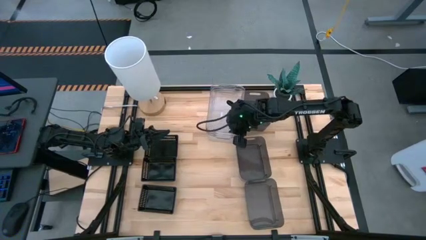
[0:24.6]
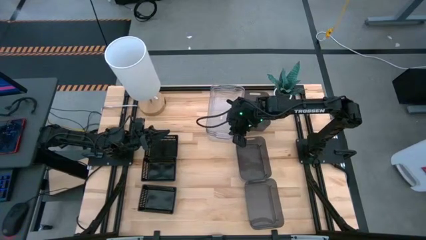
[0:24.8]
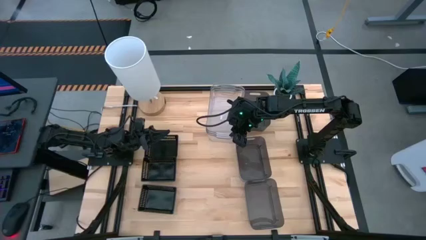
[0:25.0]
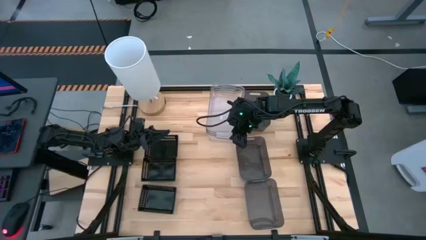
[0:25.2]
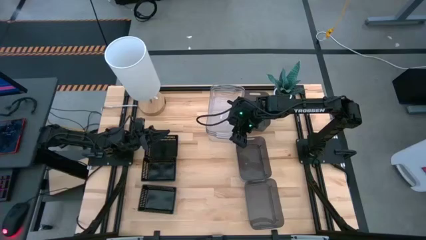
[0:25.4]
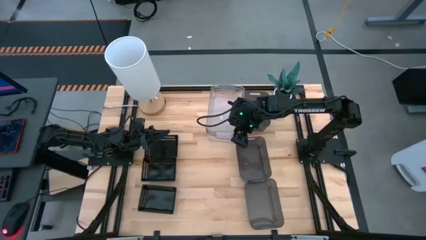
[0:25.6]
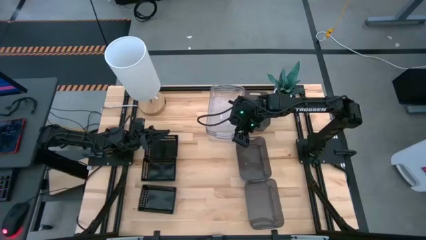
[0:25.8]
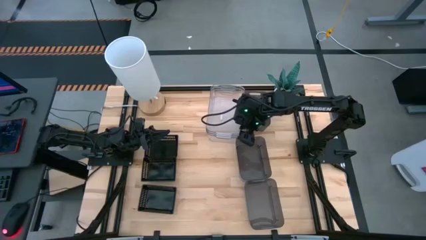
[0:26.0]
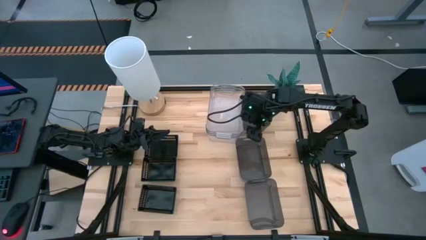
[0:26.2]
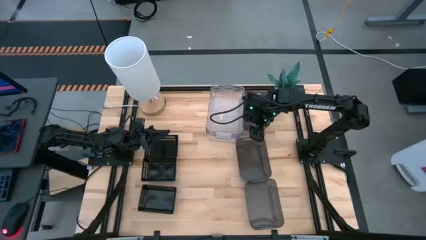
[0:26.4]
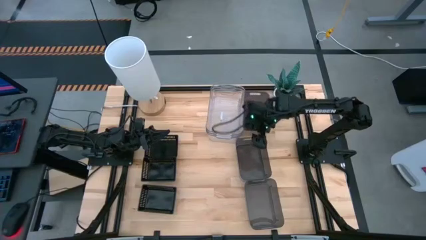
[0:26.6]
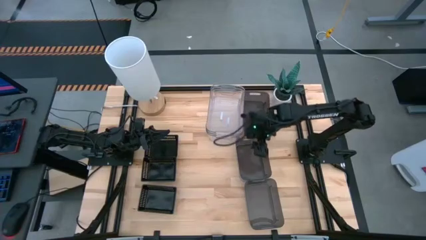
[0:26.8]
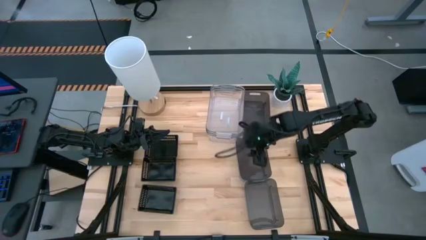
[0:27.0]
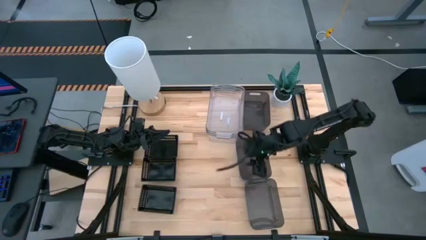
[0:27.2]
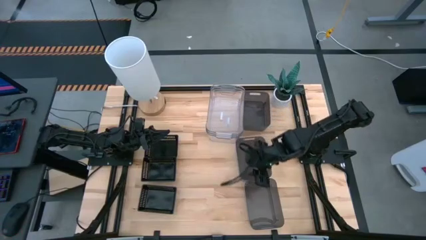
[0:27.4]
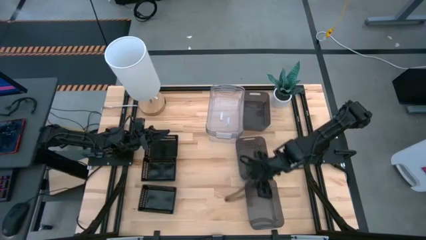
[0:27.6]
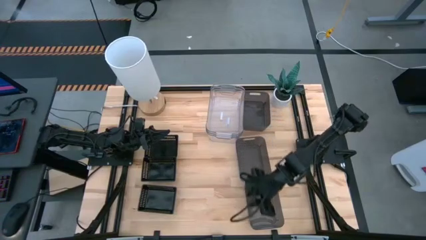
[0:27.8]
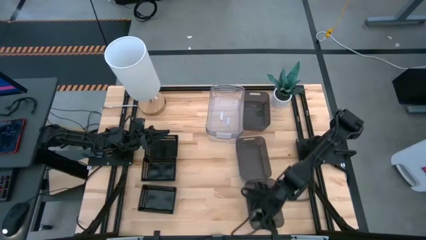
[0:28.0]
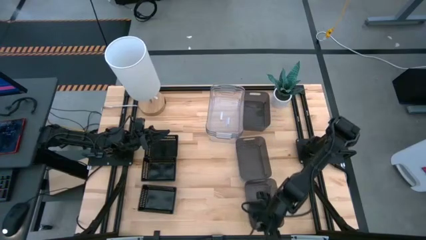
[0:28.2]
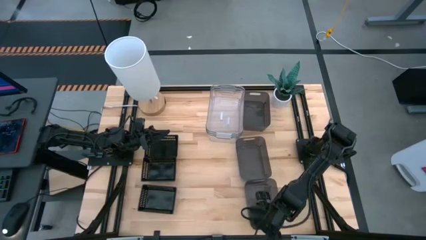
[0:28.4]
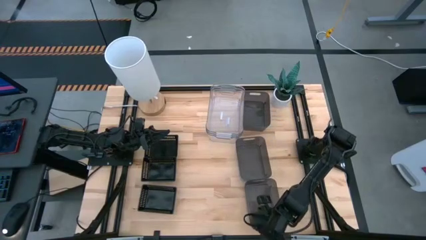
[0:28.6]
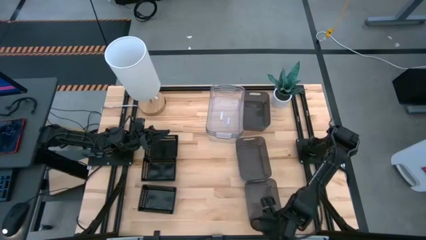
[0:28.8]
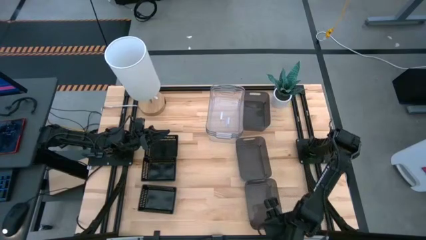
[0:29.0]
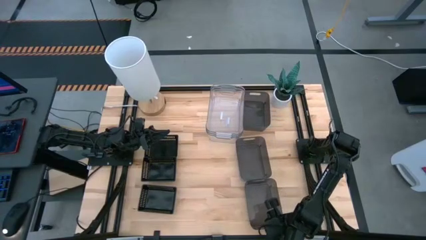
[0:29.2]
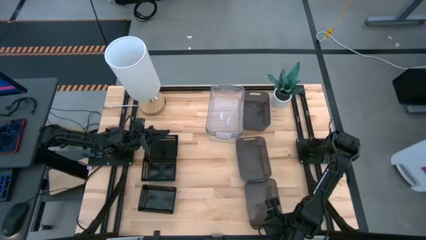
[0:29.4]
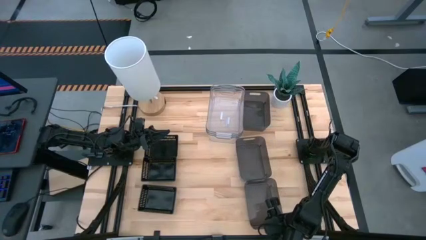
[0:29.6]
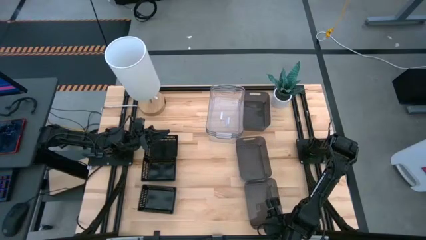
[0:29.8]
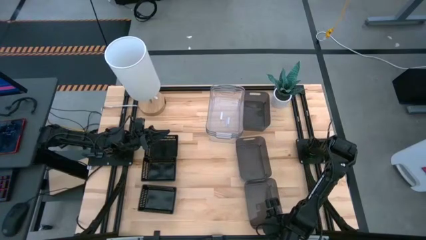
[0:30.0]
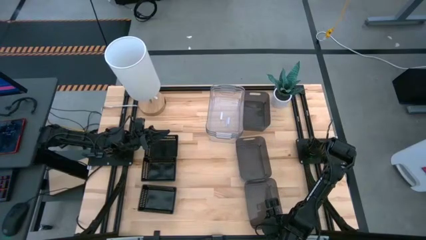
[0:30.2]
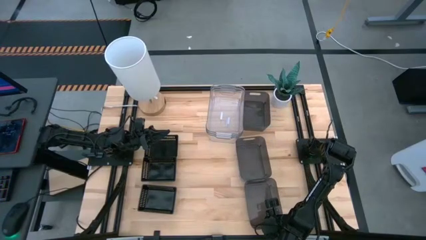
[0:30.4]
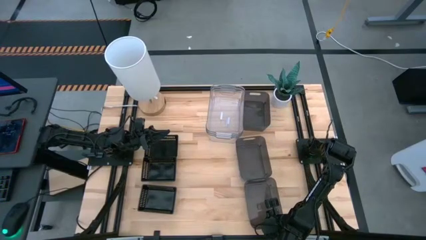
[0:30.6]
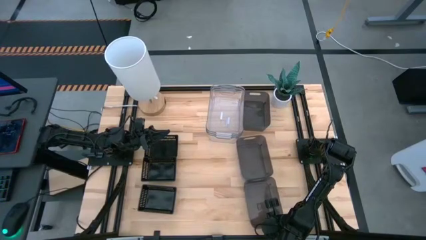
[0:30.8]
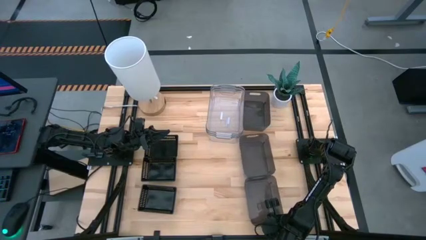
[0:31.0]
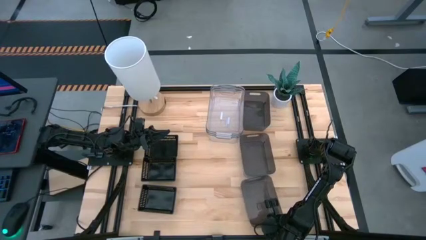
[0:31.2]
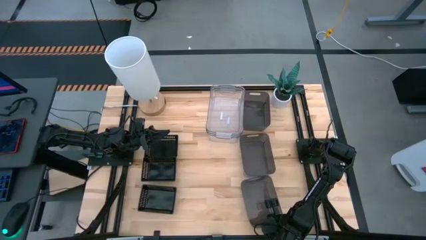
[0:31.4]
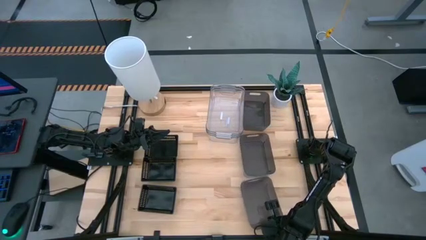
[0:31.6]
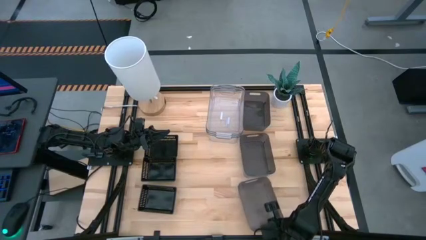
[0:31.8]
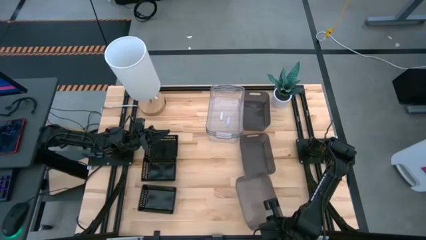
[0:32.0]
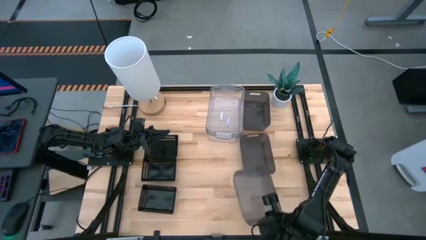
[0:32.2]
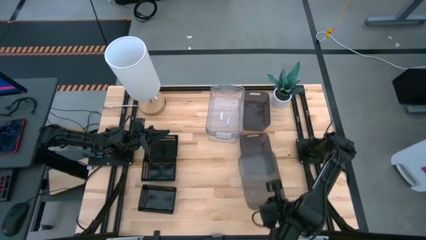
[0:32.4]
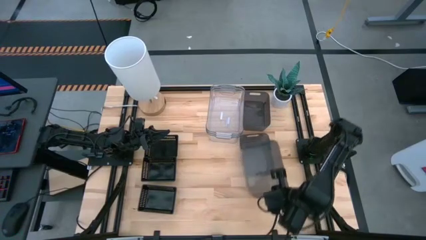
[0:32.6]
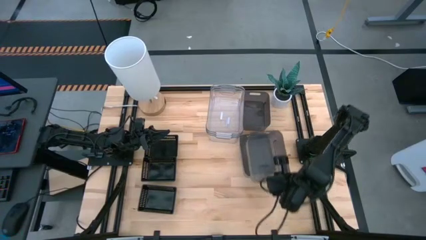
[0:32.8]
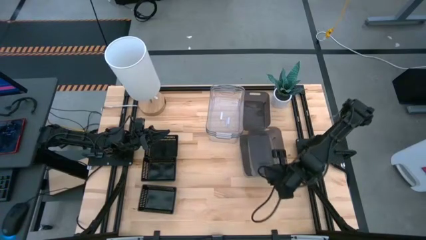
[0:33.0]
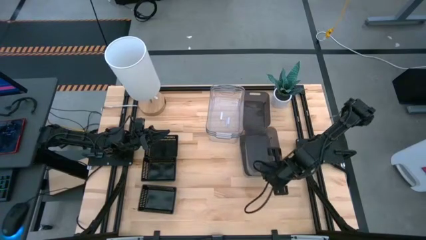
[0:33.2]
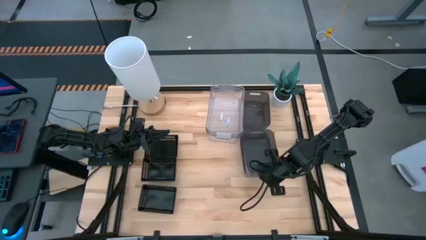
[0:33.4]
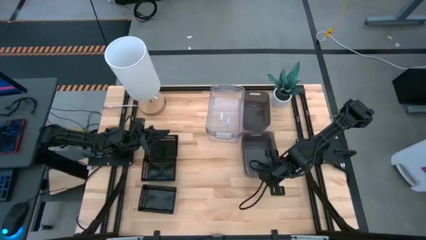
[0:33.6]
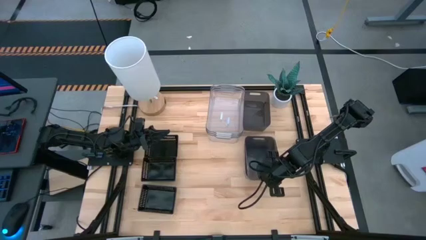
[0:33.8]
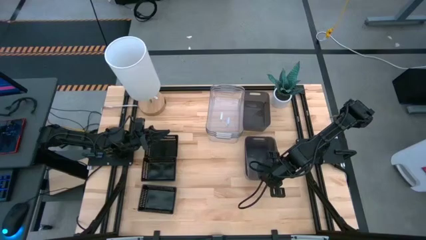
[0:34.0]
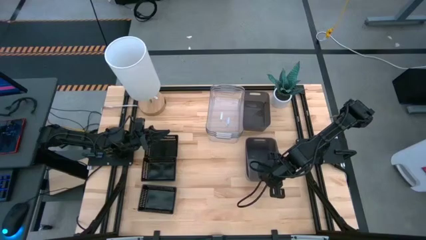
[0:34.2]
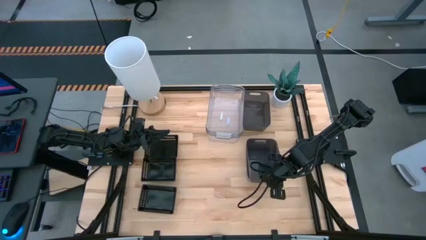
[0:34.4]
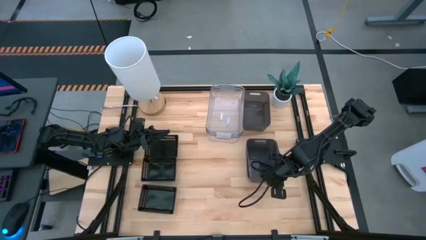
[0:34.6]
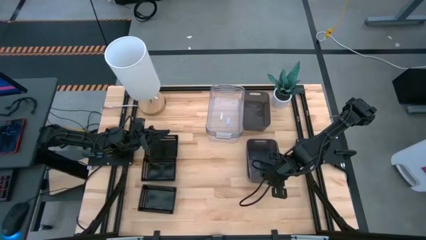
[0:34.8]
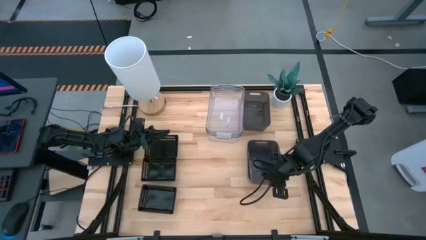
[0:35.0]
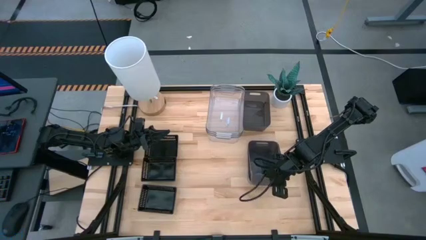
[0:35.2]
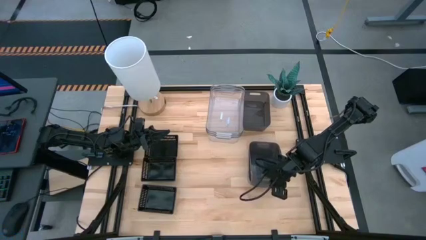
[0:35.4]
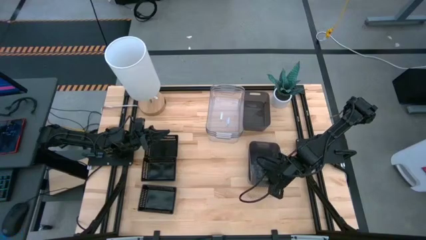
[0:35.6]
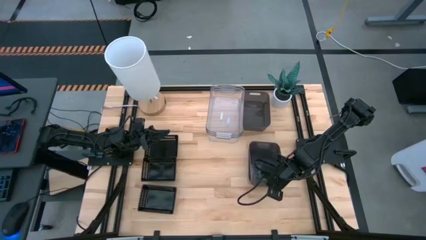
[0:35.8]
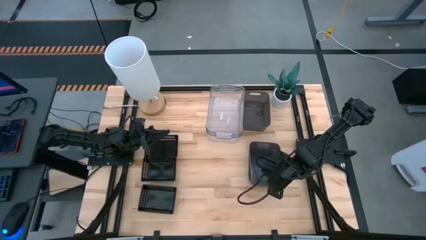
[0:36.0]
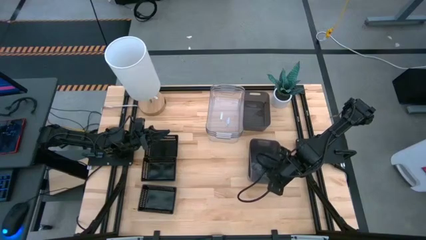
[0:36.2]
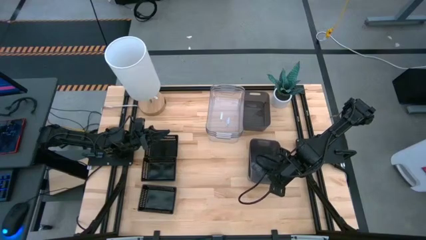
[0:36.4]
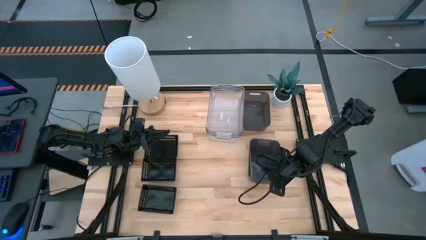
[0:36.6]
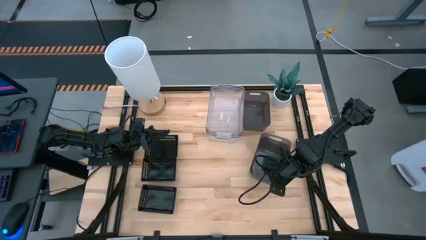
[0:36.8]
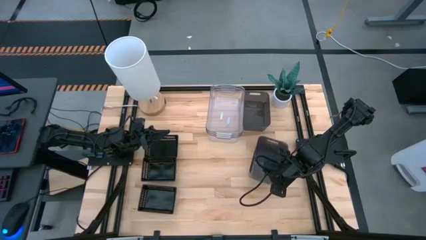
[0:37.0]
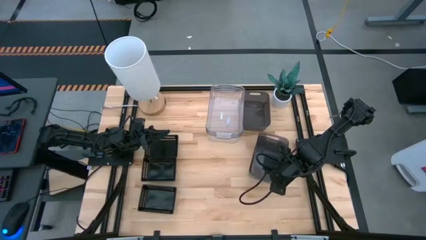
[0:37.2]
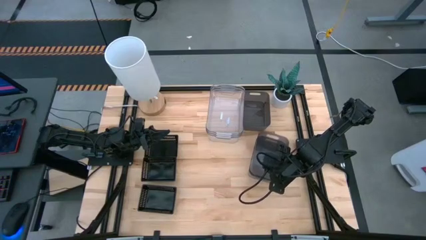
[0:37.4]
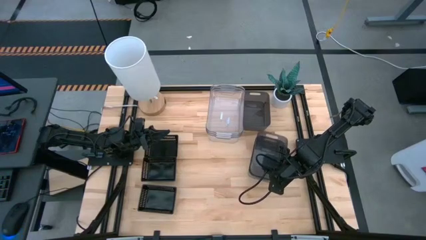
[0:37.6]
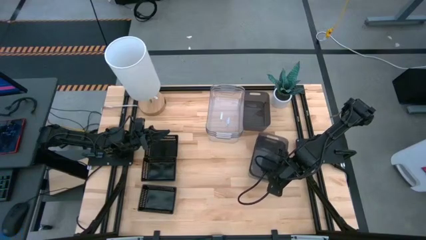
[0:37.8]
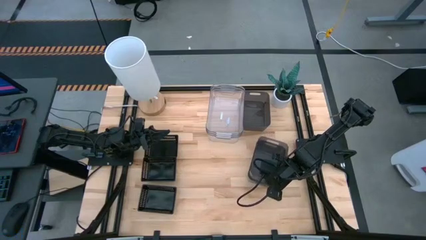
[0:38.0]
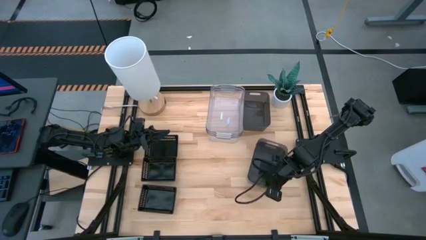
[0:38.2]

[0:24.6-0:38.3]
Stack the bottom black bin on top of the middle black bin
